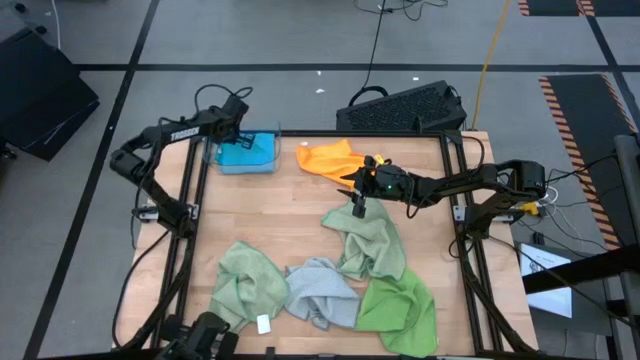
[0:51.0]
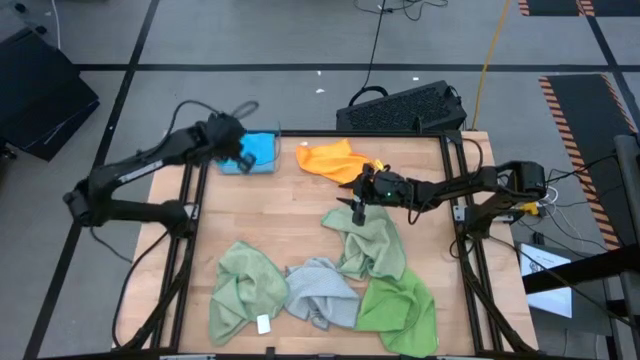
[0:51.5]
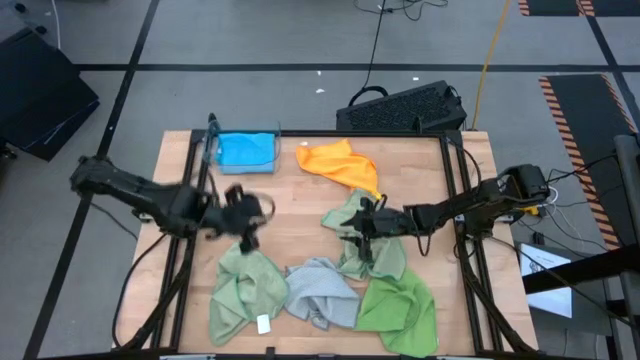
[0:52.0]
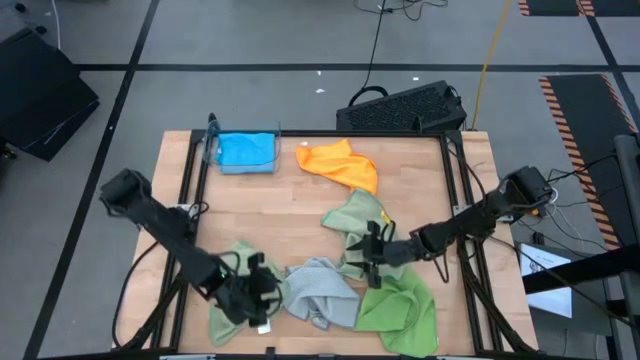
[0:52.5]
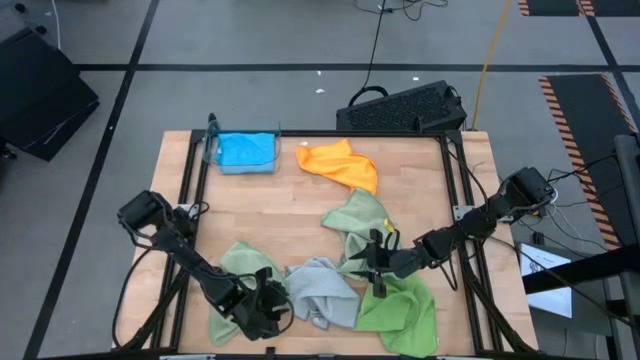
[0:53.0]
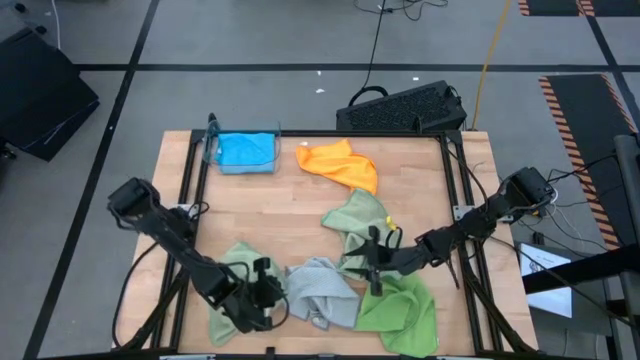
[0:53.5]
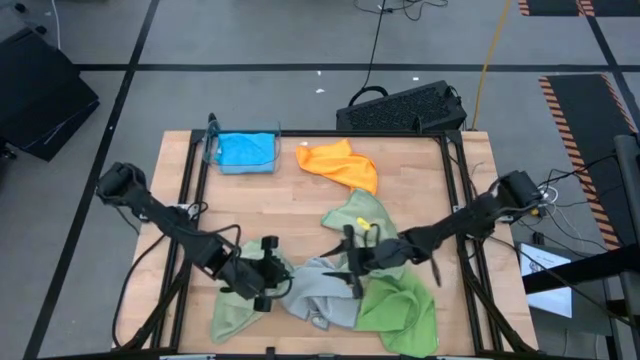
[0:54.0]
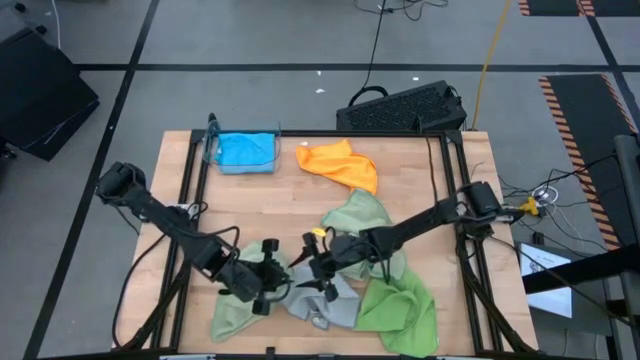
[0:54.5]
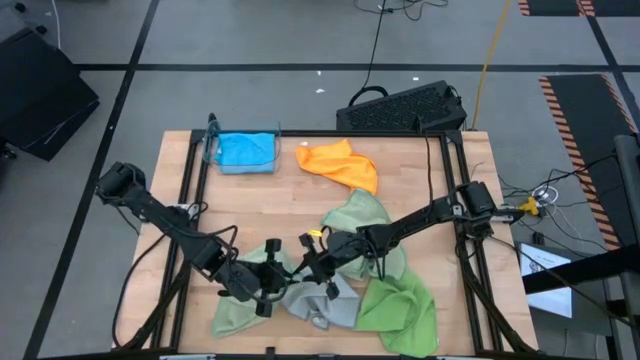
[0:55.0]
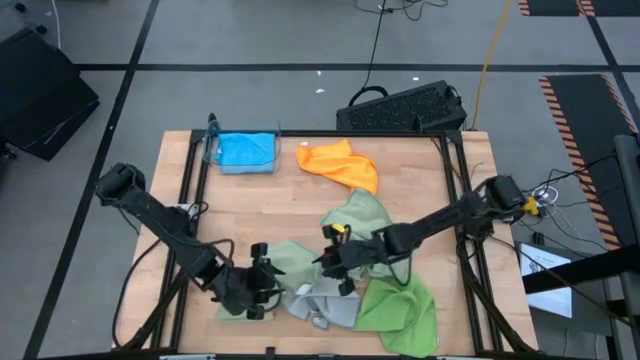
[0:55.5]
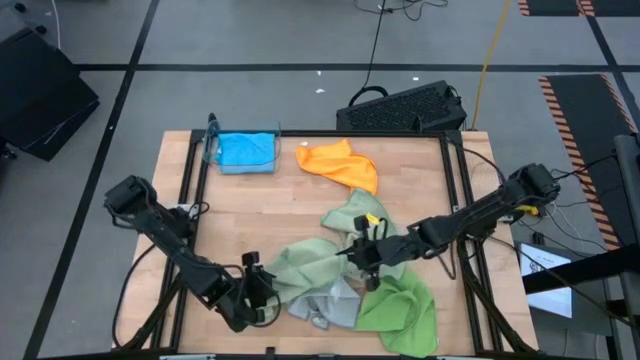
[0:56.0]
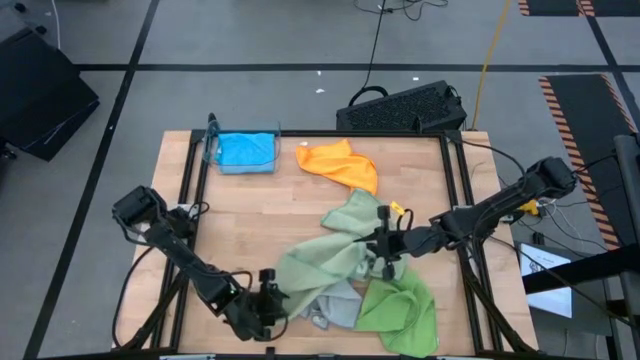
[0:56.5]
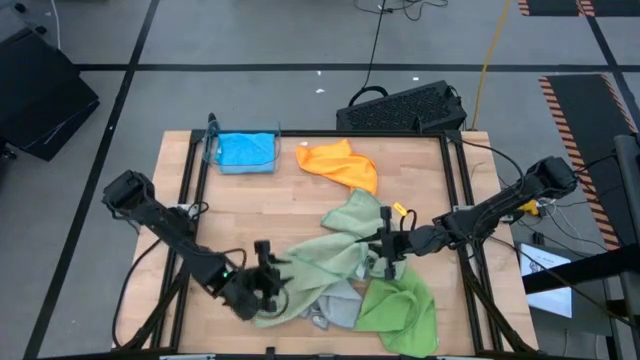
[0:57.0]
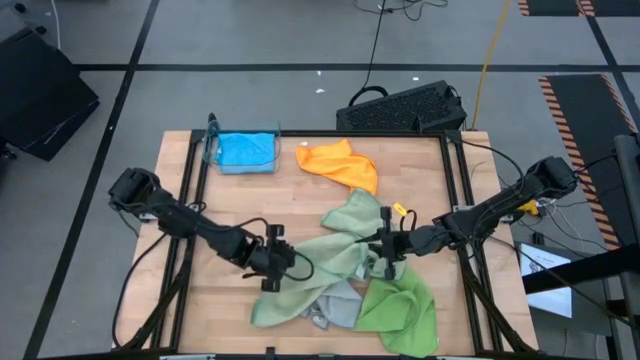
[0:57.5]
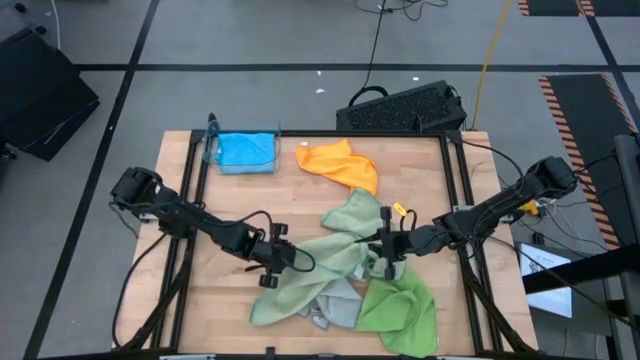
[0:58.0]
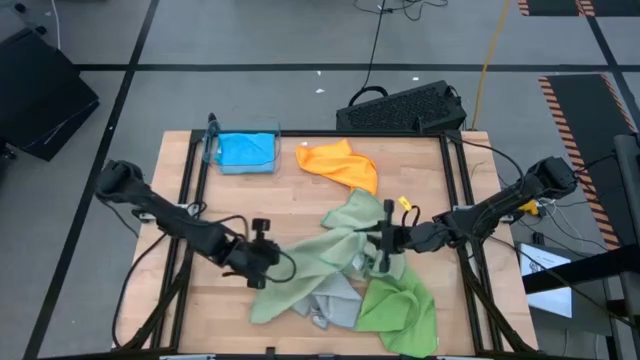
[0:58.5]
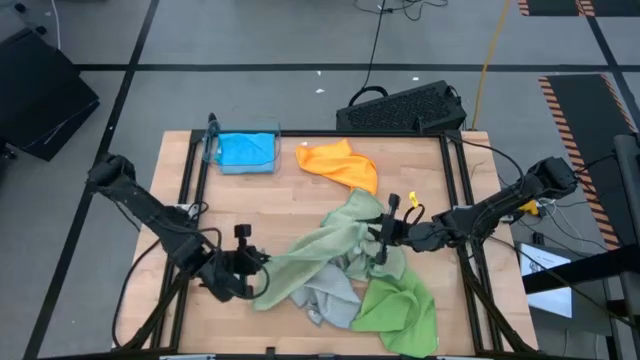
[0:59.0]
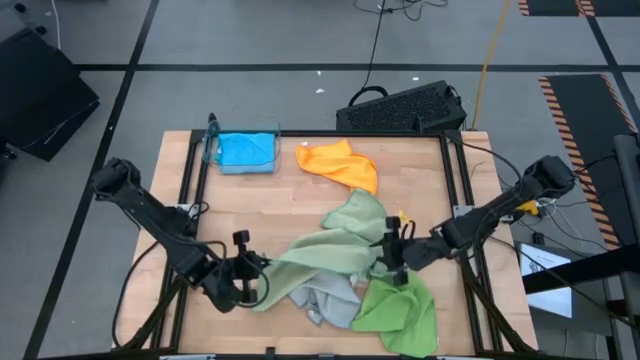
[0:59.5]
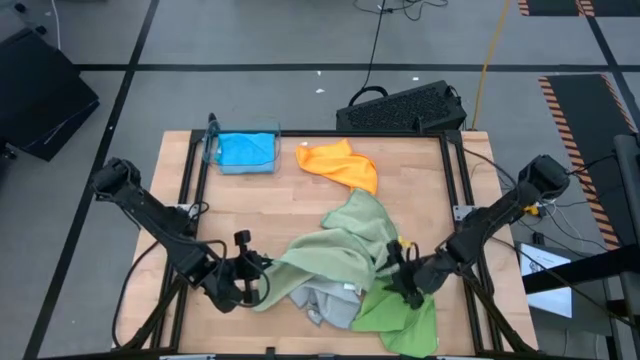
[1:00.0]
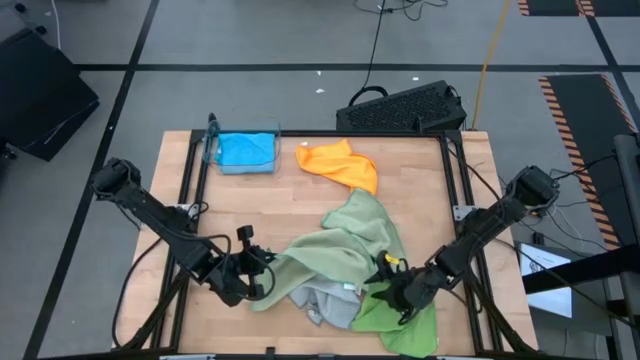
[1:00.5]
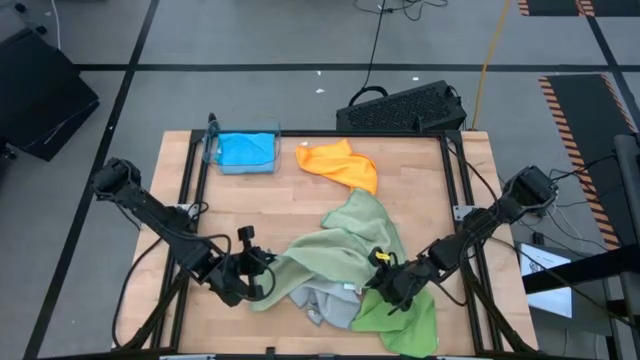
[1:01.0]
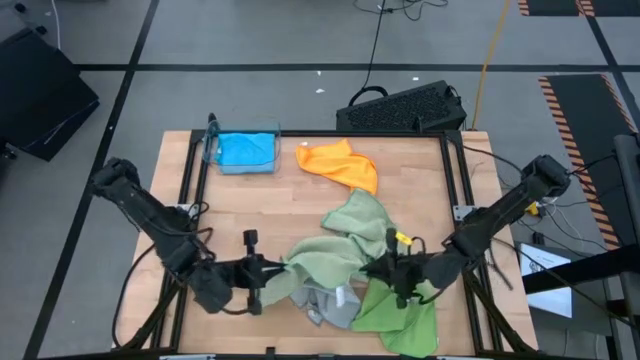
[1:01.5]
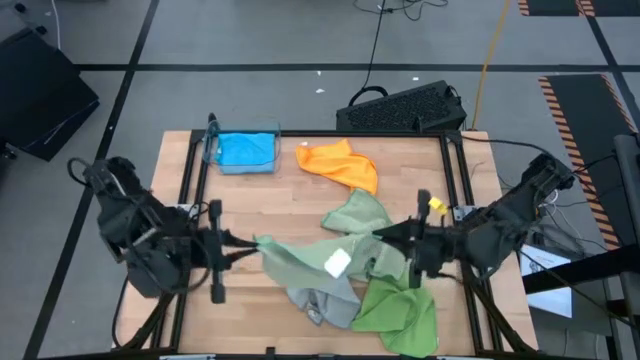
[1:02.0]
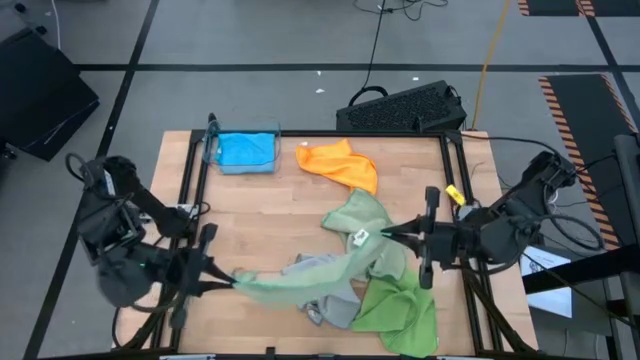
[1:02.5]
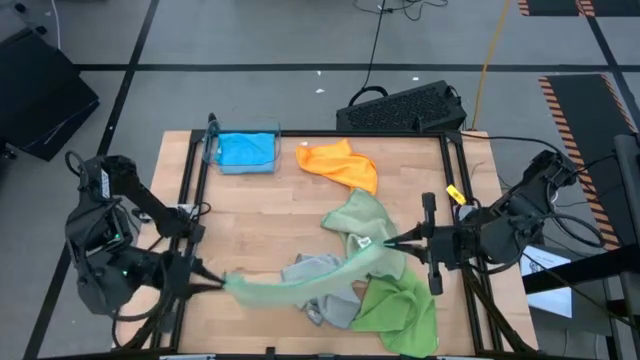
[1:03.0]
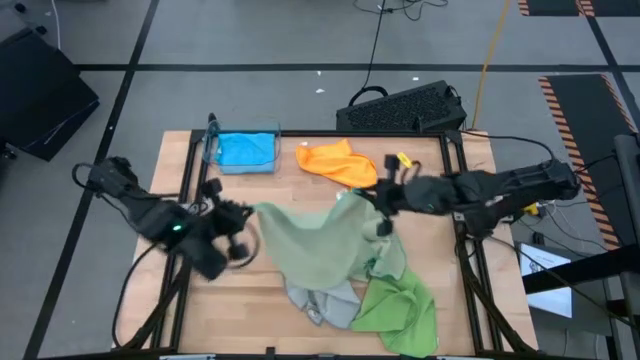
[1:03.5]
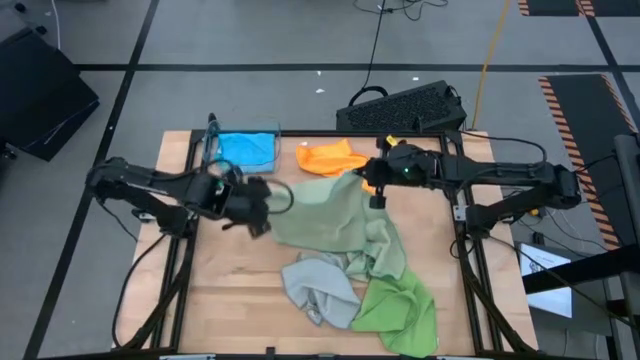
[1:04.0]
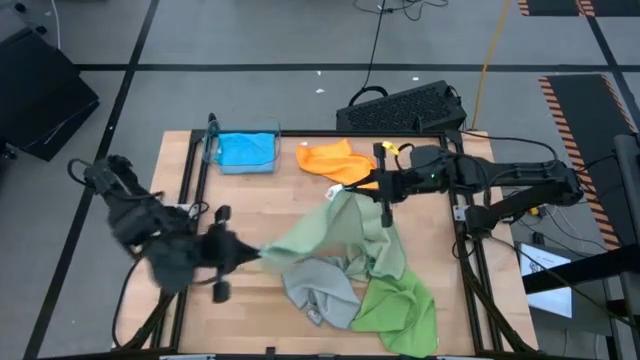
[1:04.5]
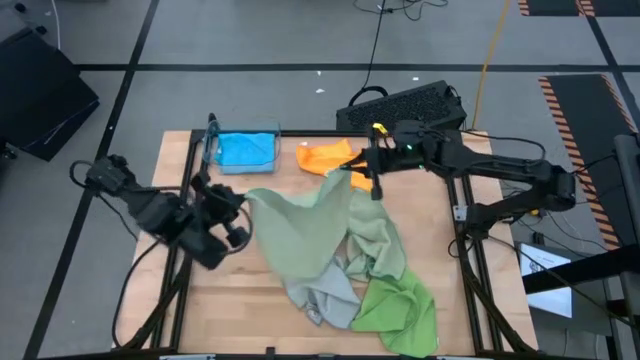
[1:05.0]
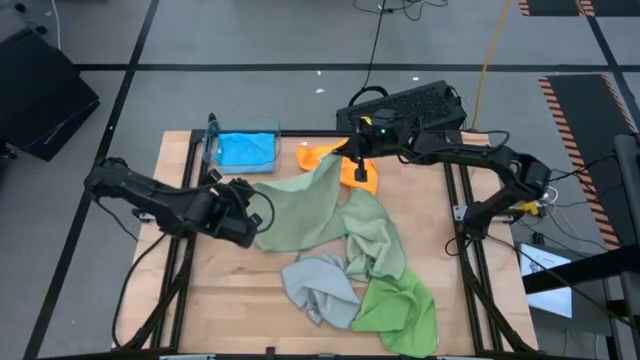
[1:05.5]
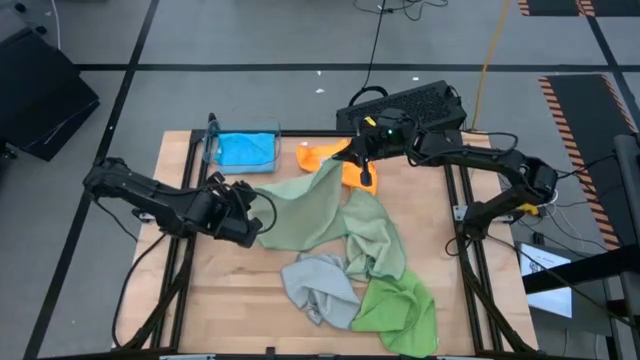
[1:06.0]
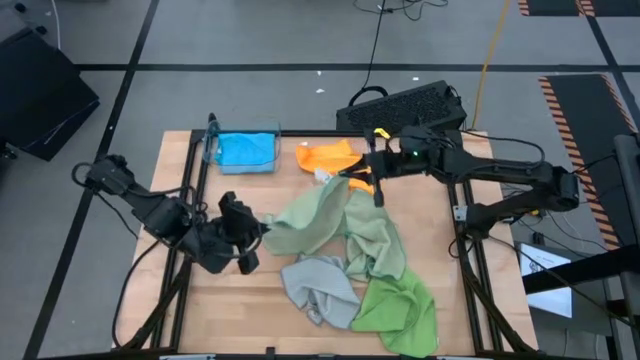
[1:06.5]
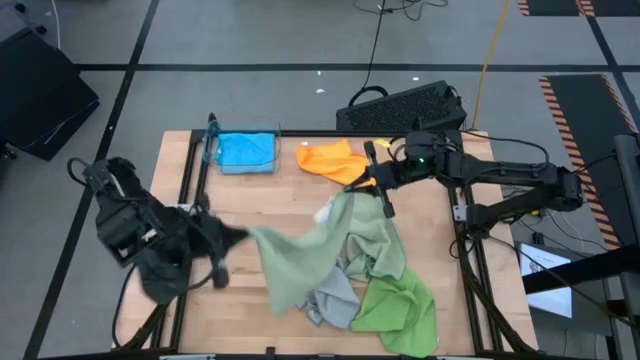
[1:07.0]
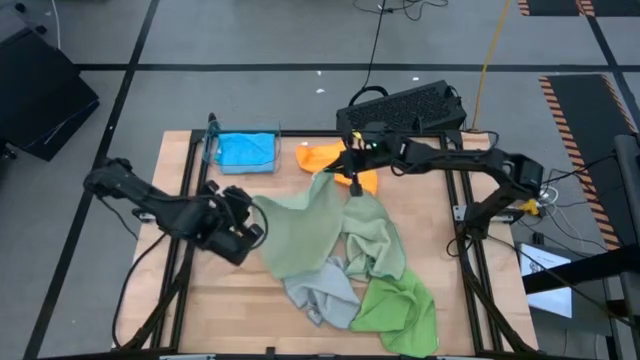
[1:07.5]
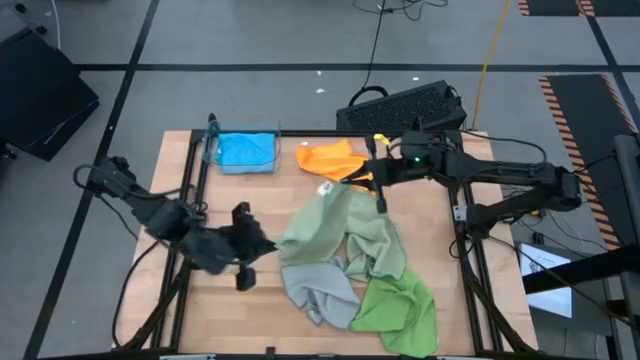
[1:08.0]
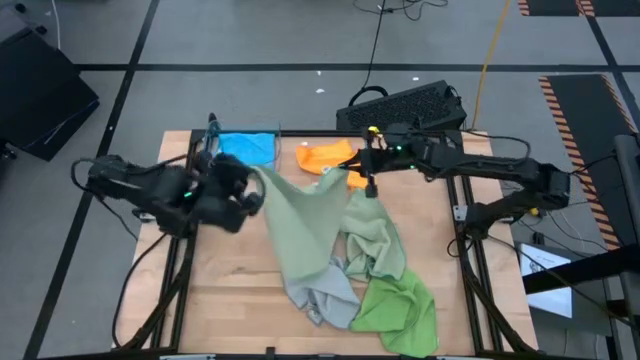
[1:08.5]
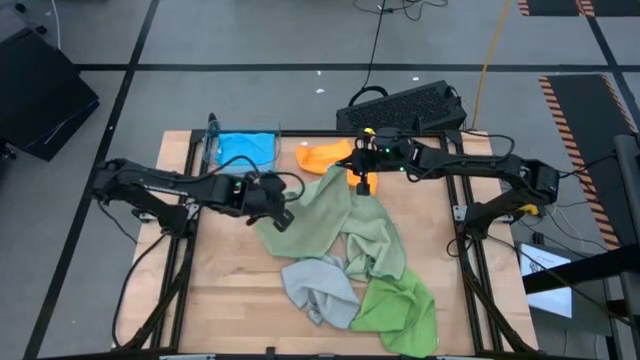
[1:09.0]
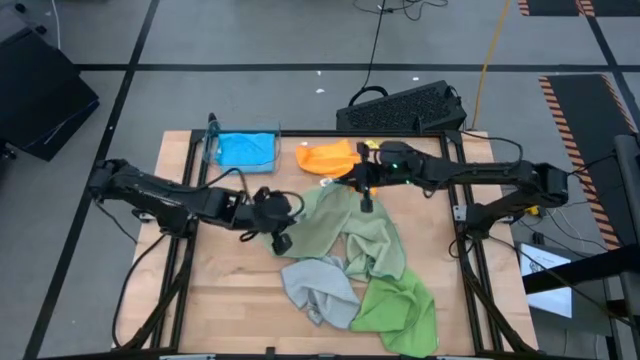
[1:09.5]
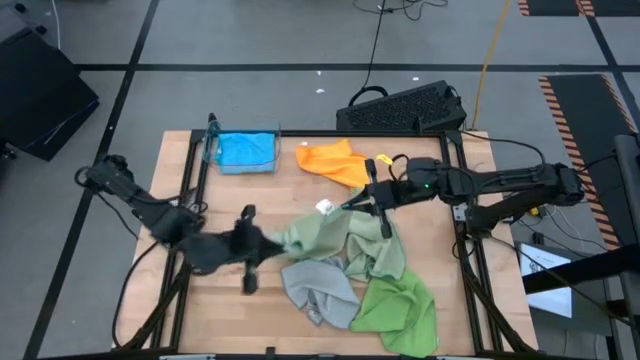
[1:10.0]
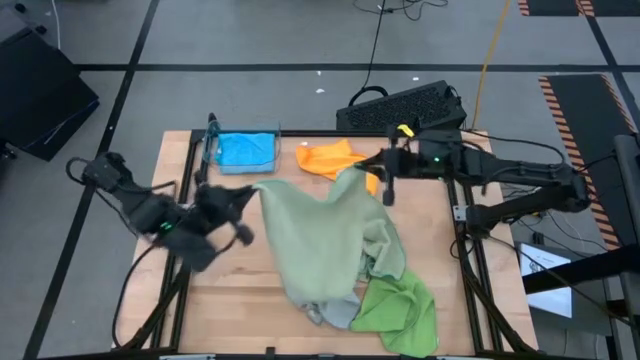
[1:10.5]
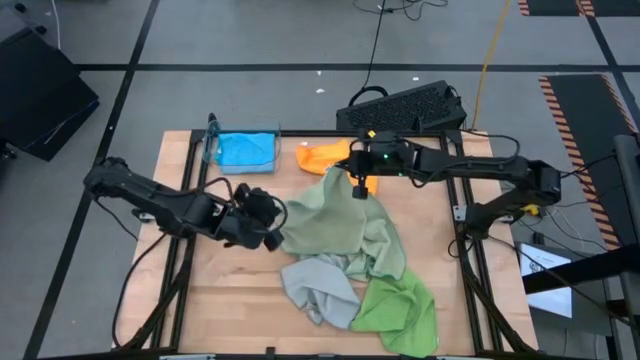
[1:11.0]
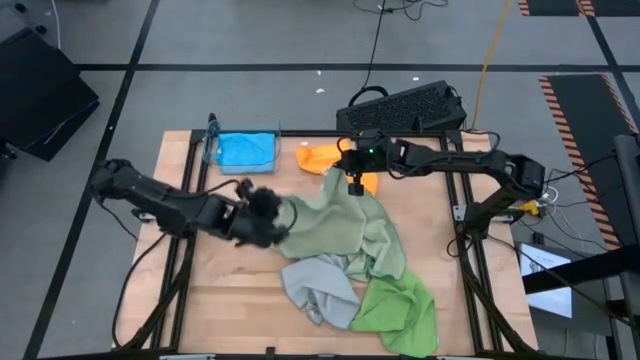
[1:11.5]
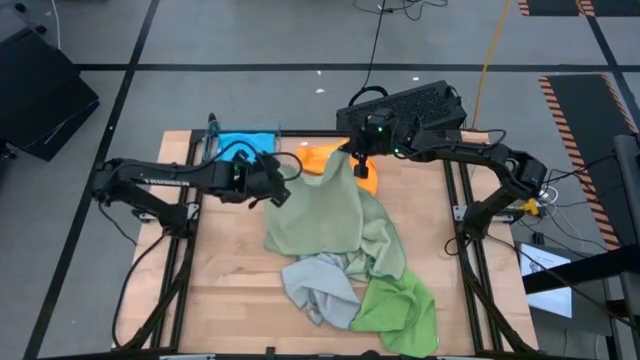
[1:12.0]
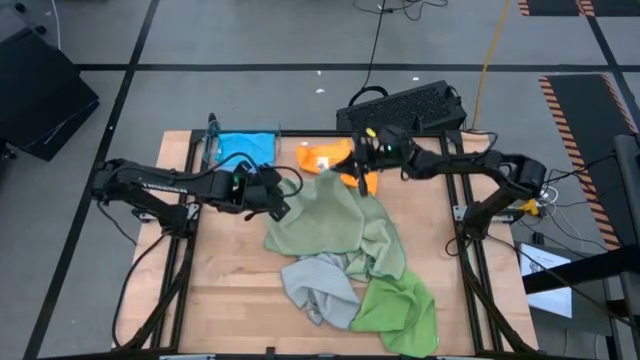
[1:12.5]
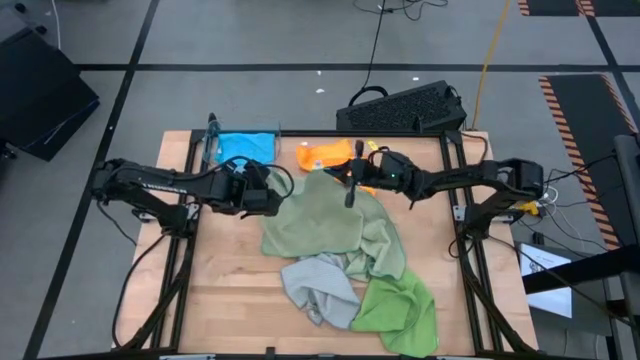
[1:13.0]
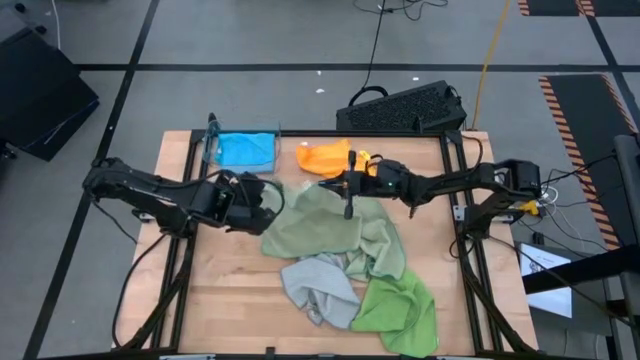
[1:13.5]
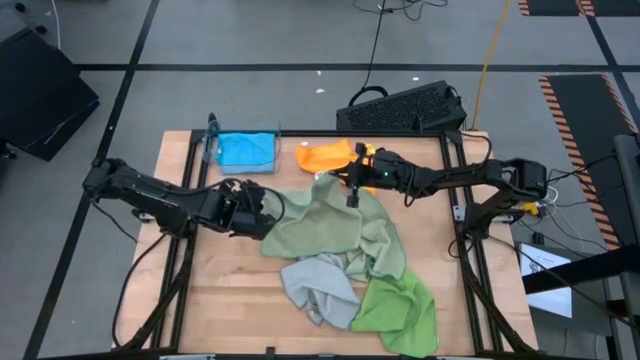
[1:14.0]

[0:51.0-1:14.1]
Task: Fold microfiber towels
Fold the left light green microfiber cloth
